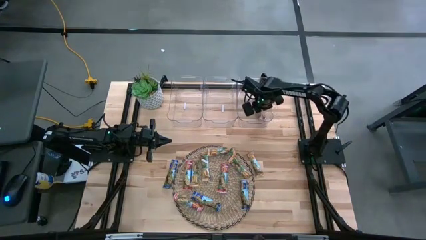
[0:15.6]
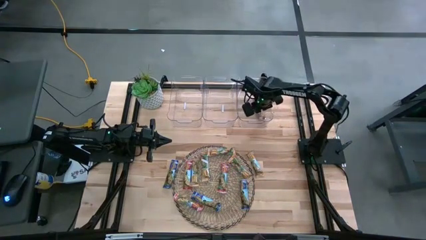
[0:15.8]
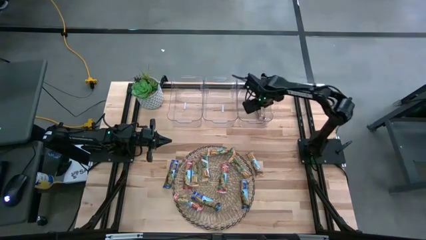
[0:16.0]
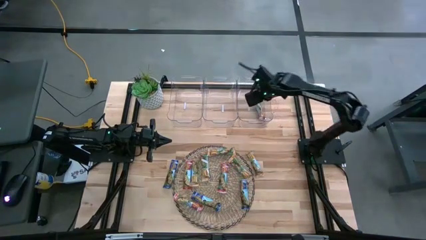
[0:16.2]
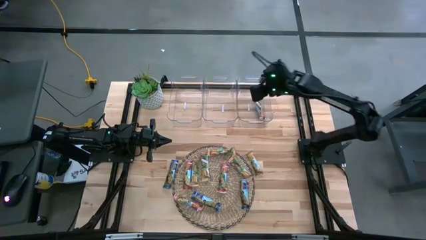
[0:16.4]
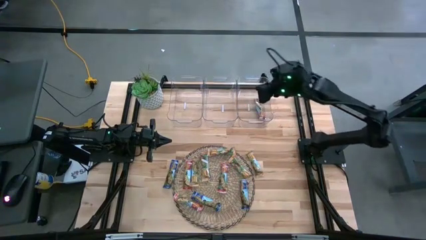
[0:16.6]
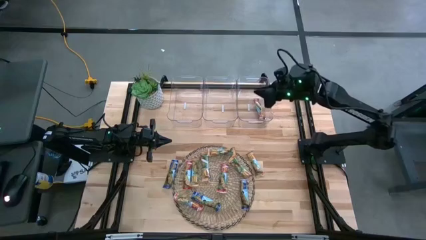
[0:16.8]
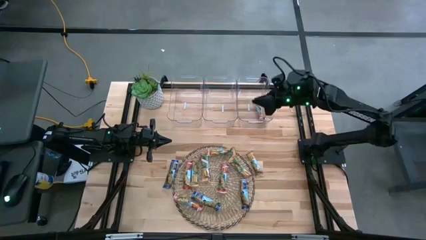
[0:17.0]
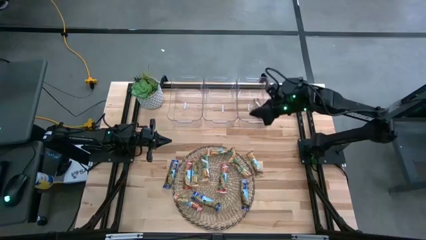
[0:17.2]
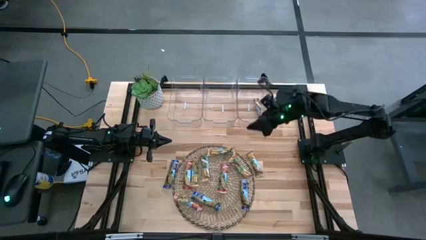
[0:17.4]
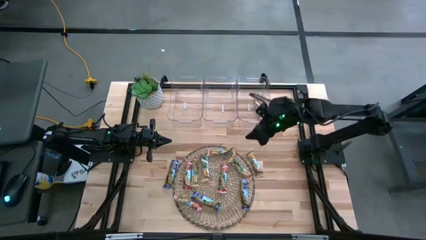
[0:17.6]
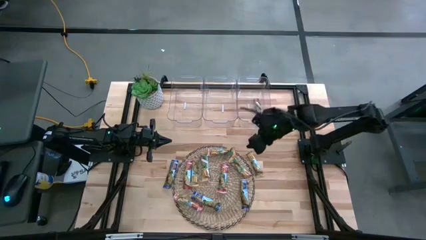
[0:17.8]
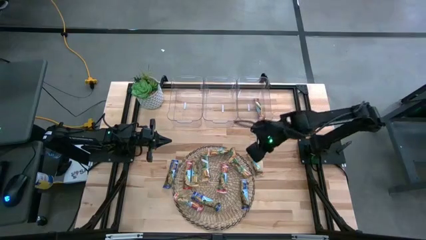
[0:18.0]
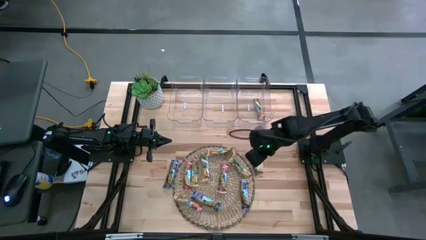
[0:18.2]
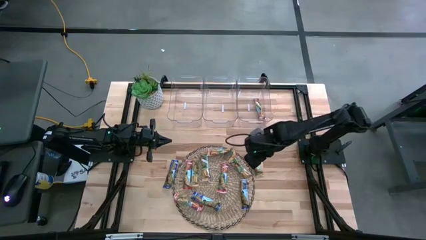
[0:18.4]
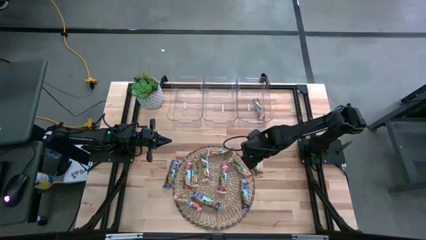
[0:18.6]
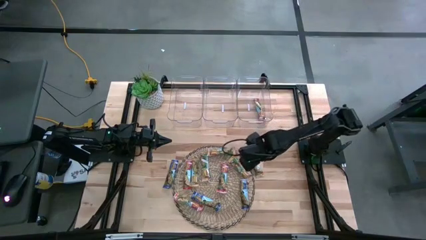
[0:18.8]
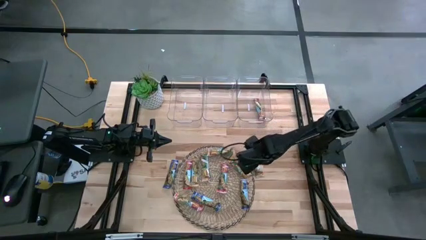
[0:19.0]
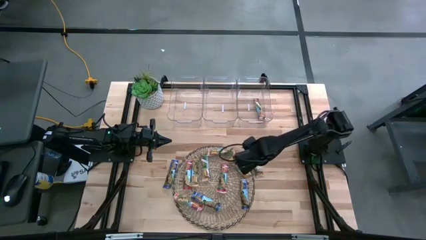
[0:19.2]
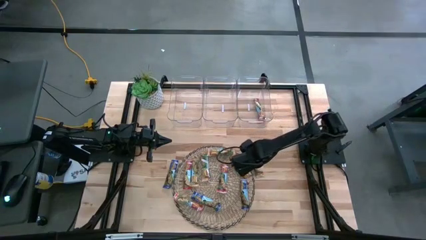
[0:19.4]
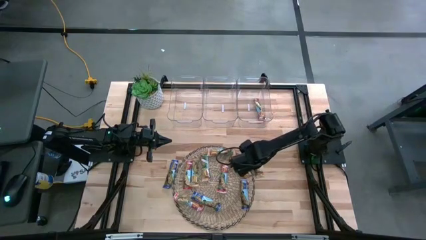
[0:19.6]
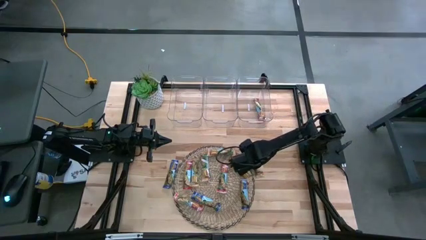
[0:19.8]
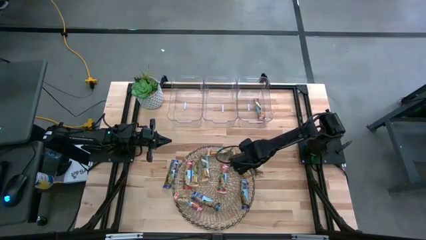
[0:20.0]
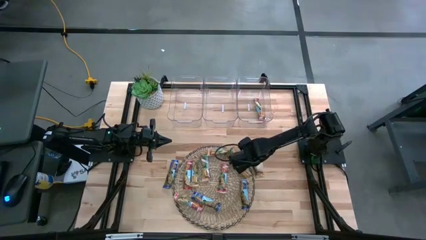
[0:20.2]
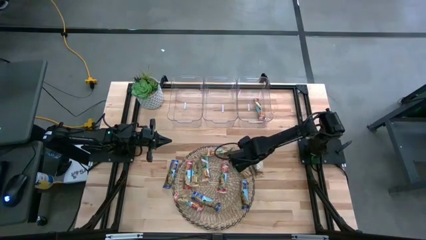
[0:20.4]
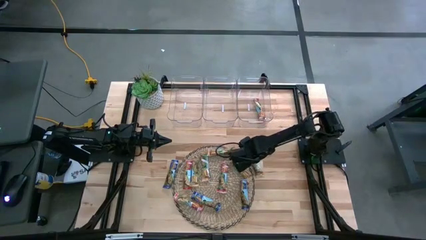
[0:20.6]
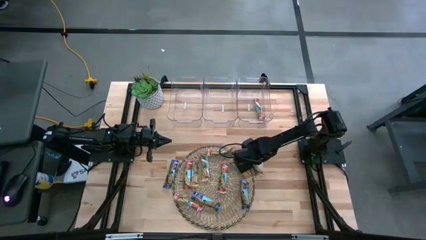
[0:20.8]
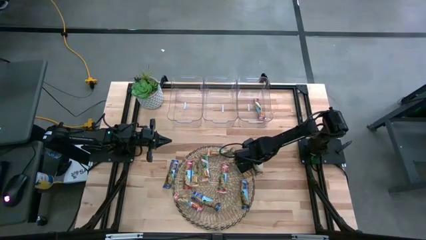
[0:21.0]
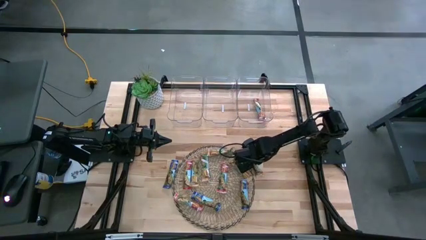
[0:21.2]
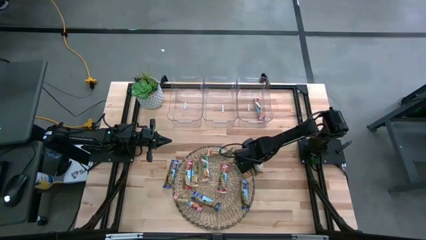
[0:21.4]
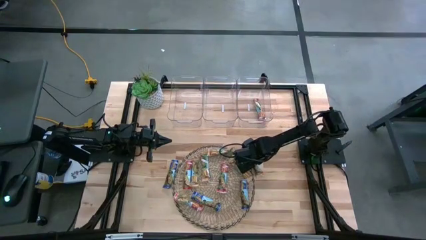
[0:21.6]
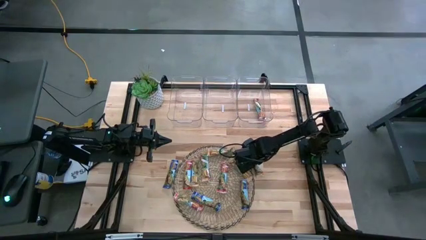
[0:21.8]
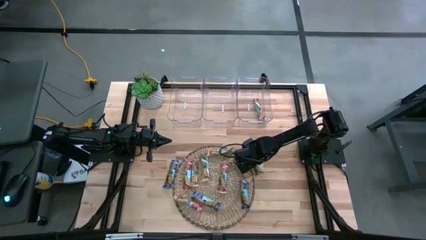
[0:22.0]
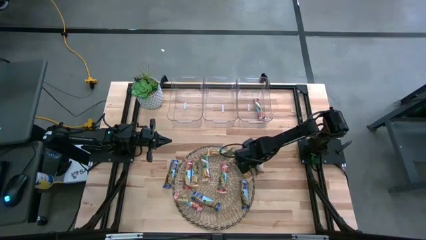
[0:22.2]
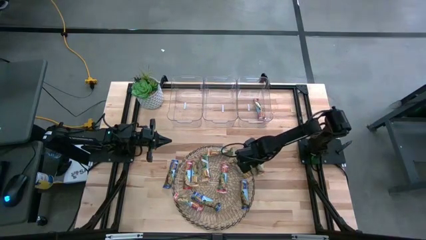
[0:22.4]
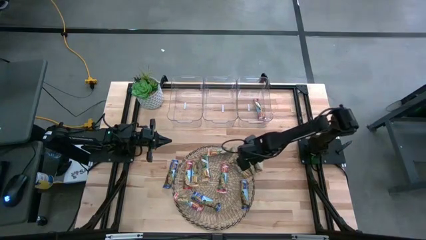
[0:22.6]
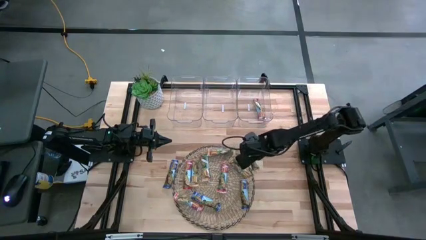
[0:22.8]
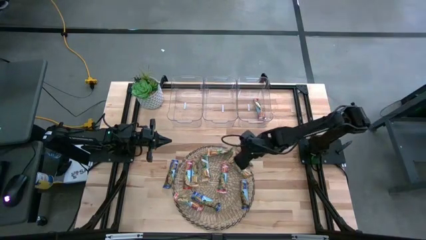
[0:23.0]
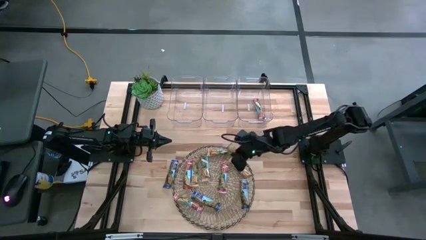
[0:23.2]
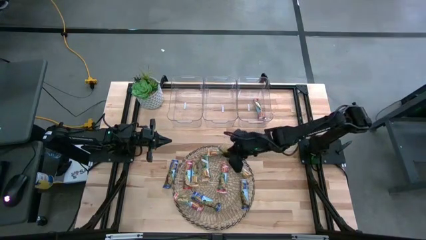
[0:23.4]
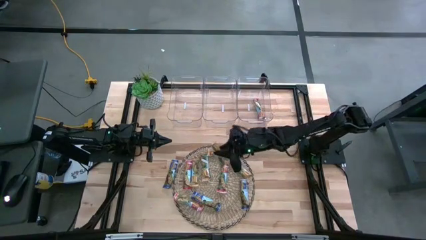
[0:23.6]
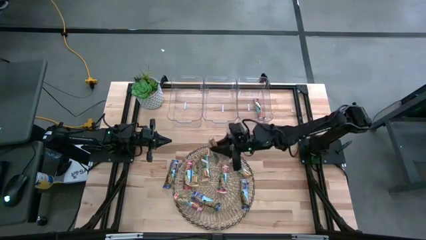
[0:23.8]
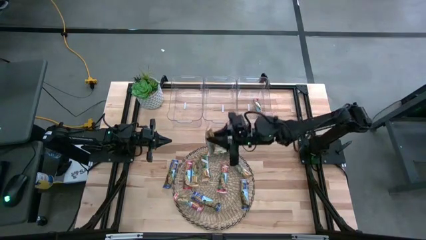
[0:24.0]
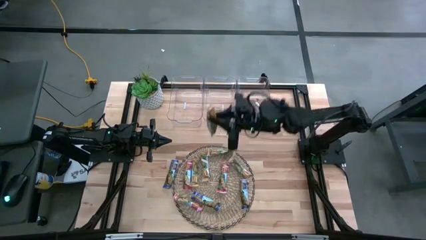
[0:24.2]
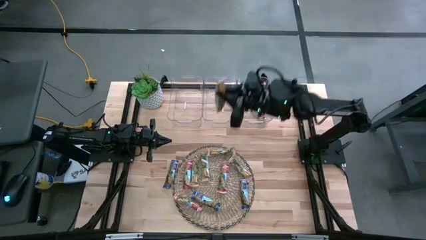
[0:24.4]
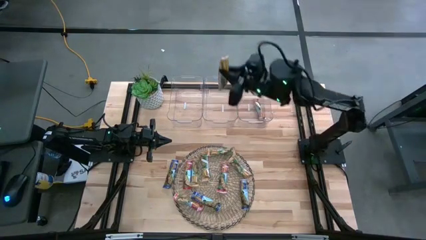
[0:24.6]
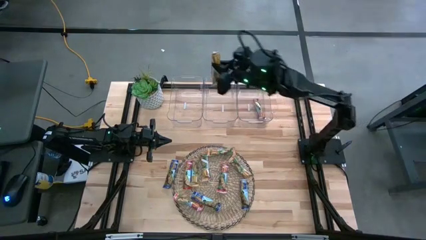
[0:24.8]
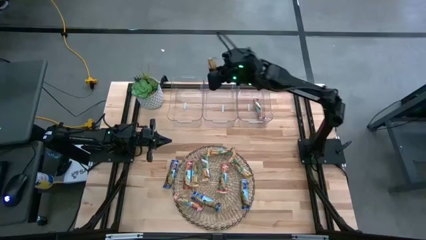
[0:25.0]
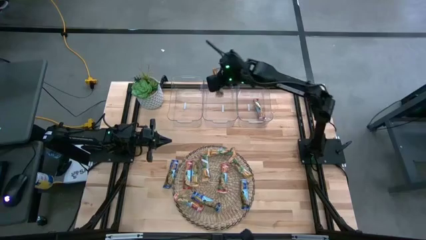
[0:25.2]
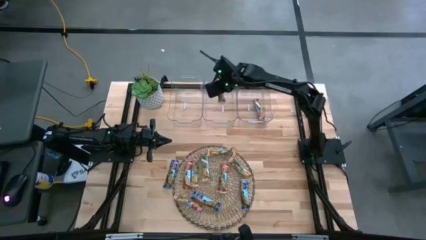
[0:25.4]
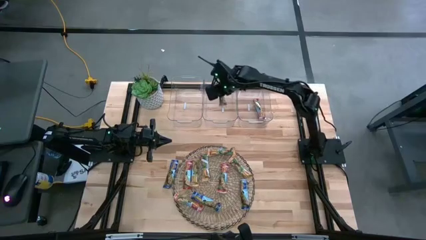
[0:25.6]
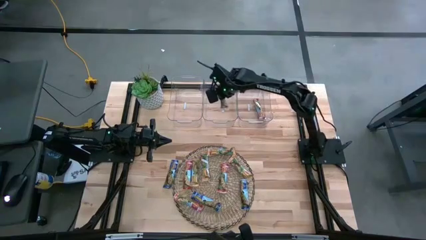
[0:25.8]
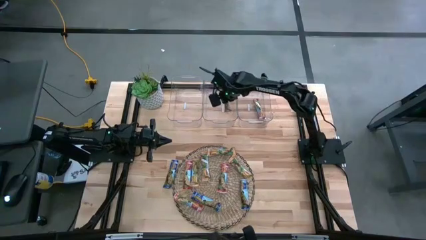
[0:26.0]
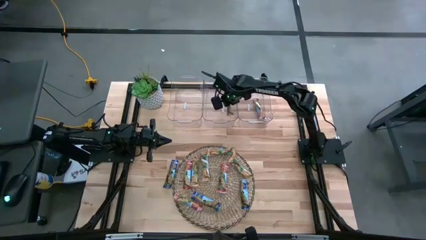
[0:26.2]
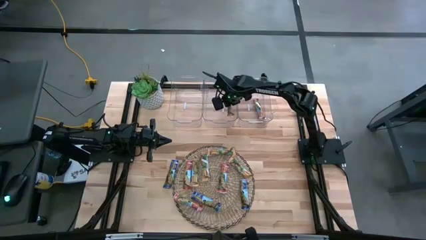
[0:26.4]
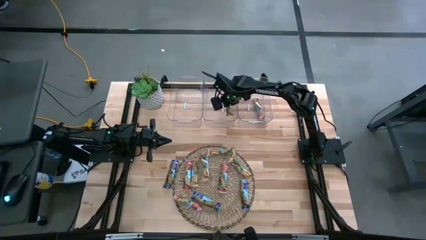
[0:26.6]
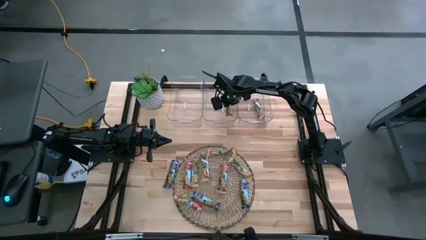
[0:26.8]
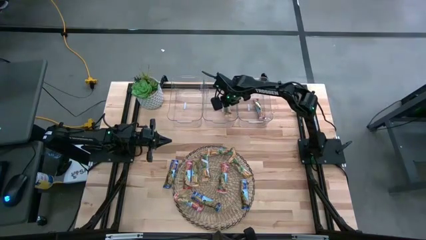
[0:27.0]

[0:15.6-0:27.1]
Task: Pick and place Granola Bars by type
Put the yellow granola bar into the middle transparent bin
